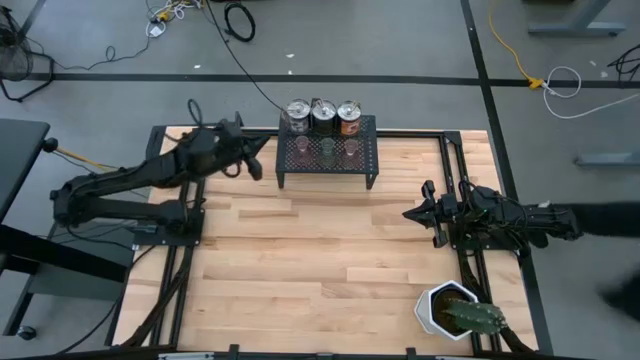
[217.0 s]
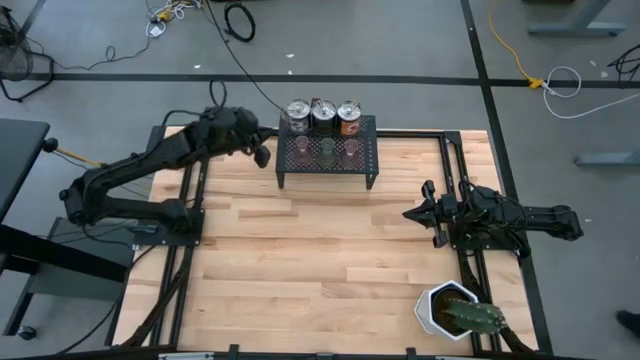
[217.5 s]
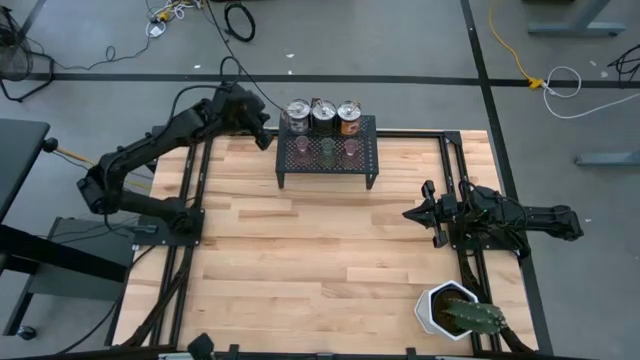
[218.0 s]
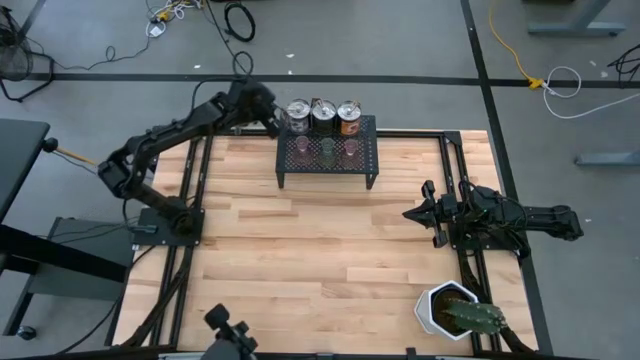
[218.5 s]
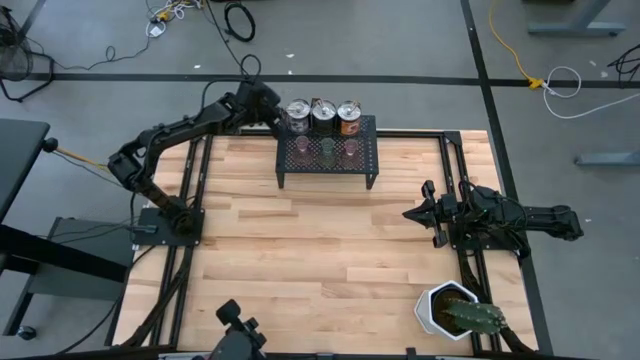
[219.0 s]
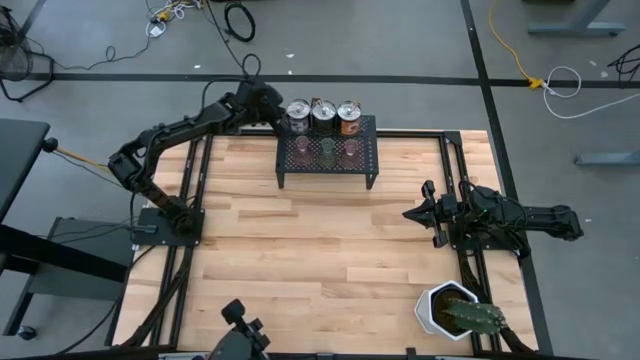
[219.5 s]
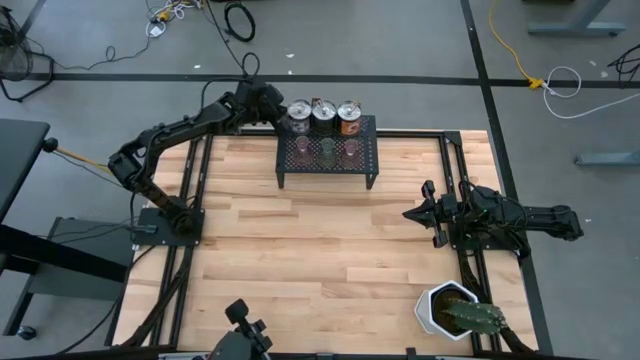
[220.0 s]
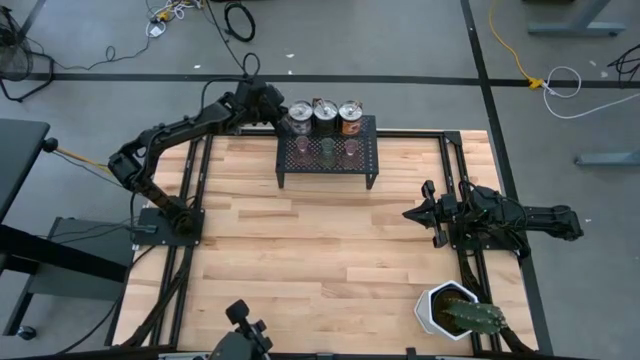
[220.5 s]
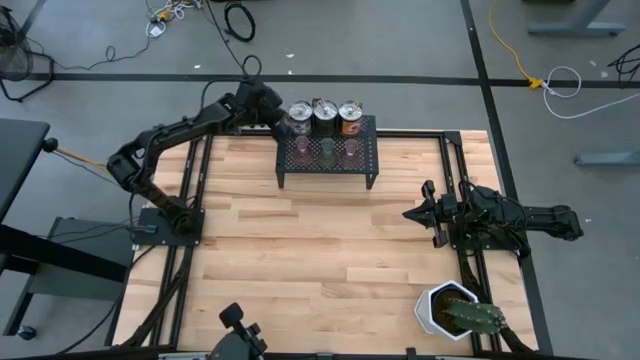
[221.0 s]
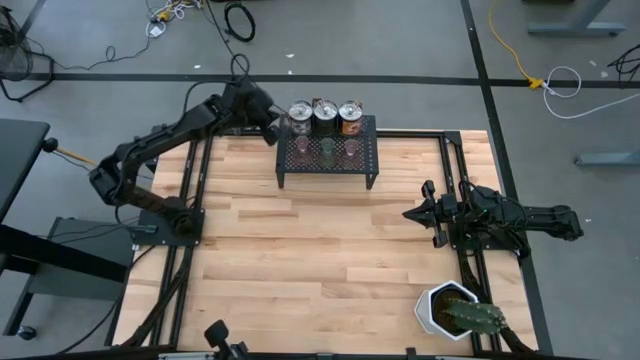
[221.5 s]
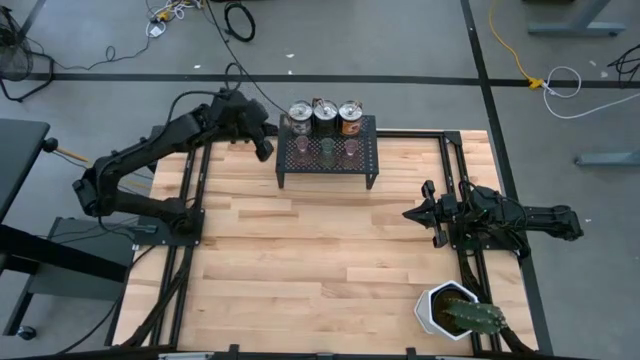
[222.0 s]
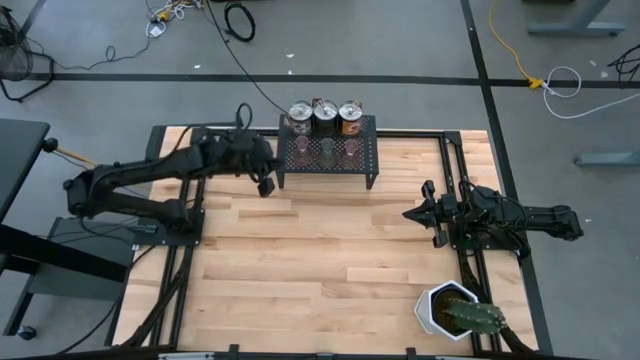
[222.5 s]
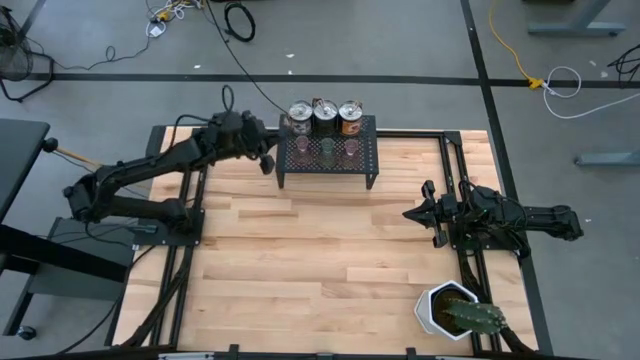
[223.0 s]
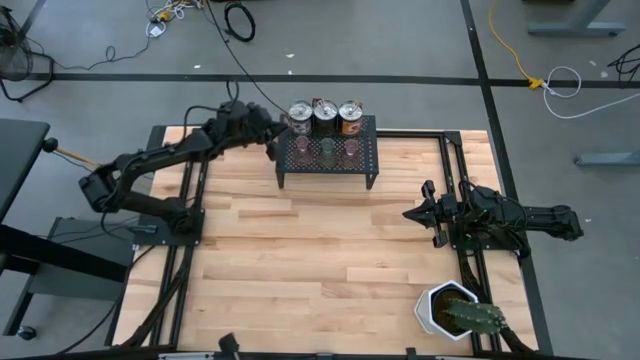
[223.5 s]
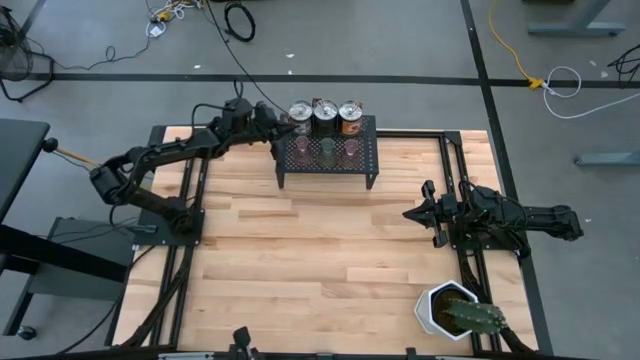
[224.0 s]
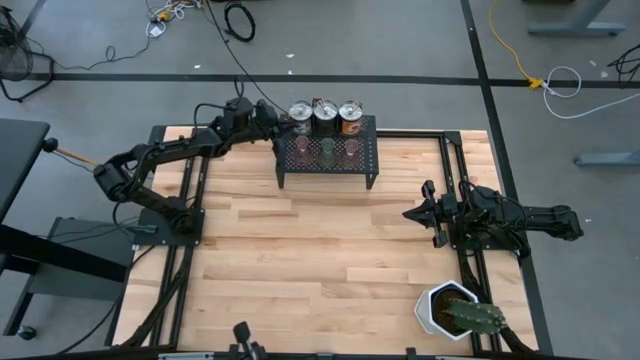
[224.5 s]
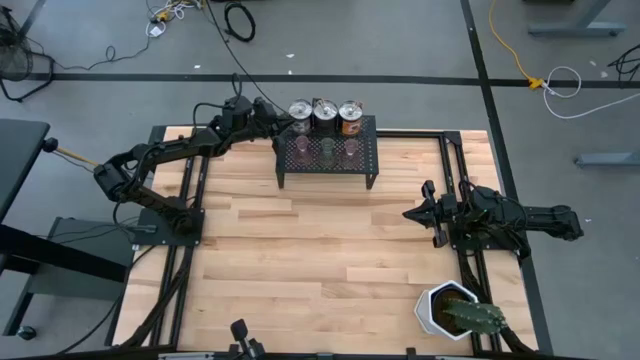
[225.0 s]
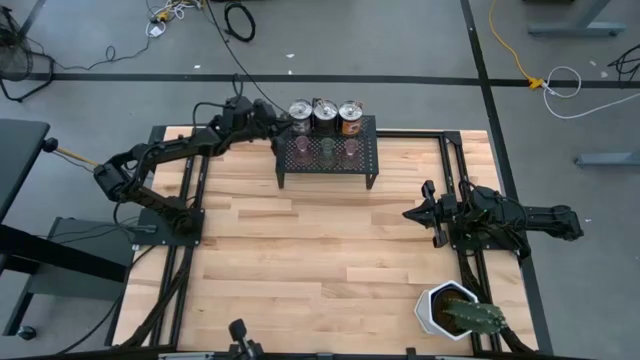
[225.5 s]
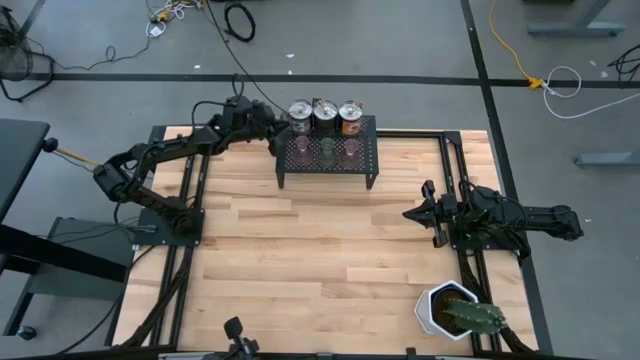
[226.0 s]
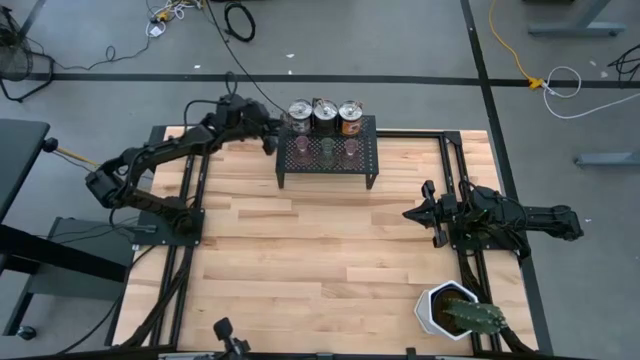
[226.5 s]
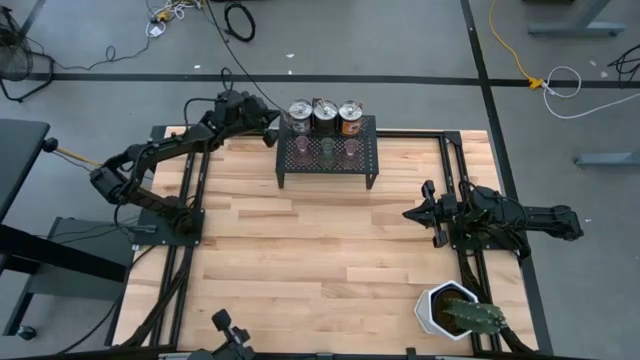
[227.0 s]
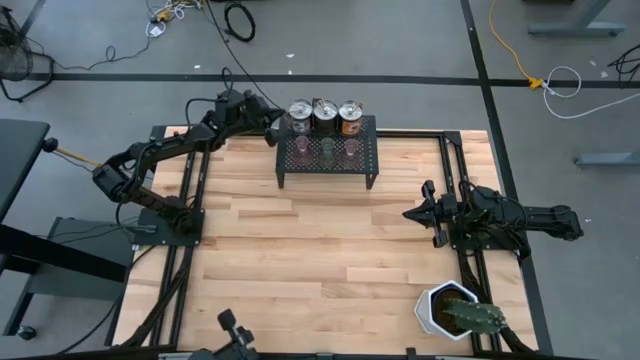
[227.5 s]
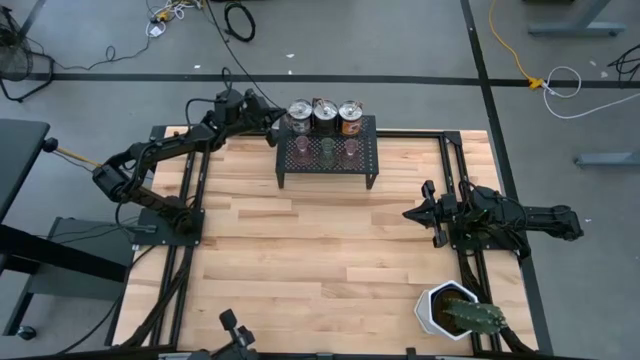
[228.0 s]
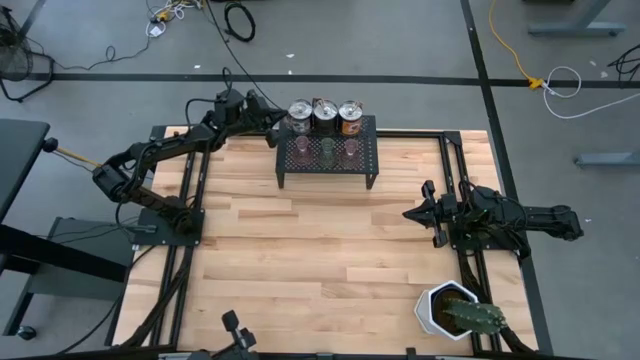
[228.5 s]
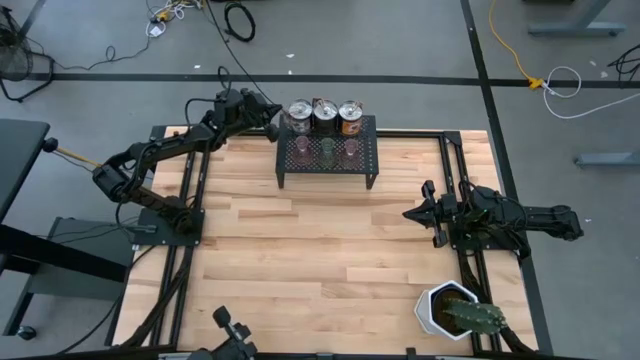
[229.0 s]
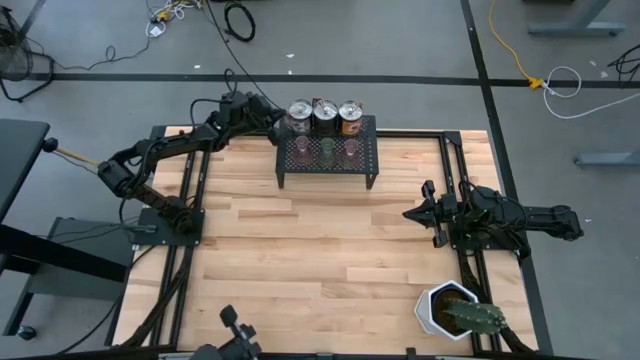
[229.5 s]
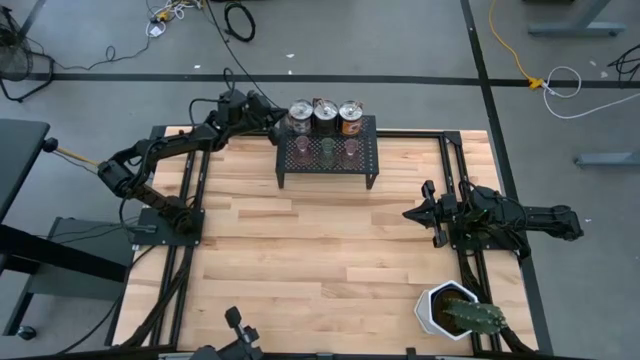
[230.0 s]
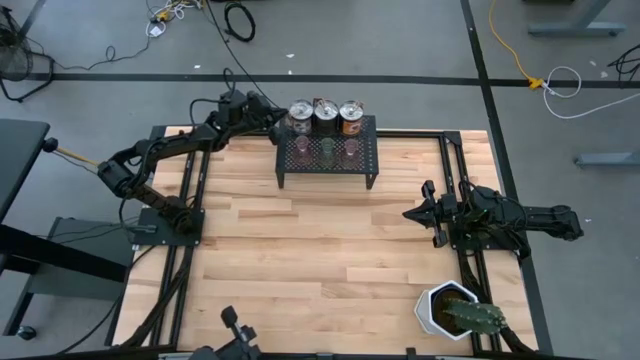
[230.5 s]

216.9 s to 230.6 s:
Task: Pick & Place candle stick holders
Adjust the silver scented candles

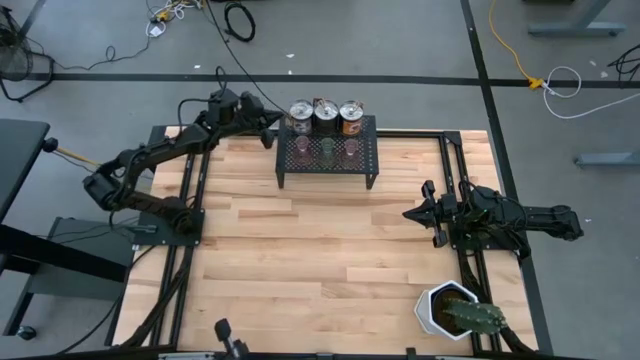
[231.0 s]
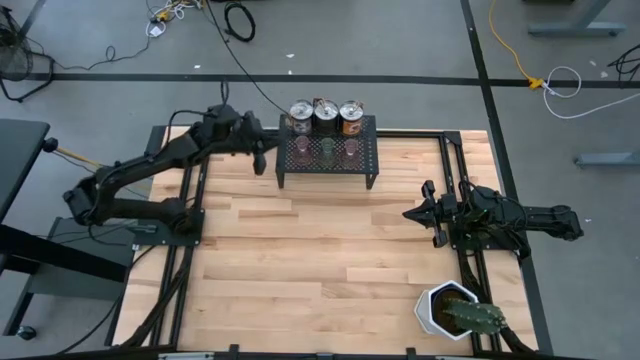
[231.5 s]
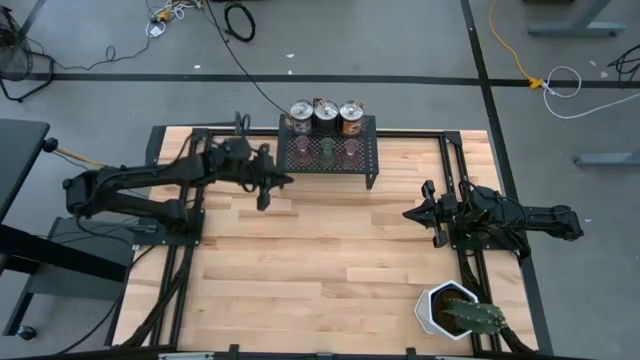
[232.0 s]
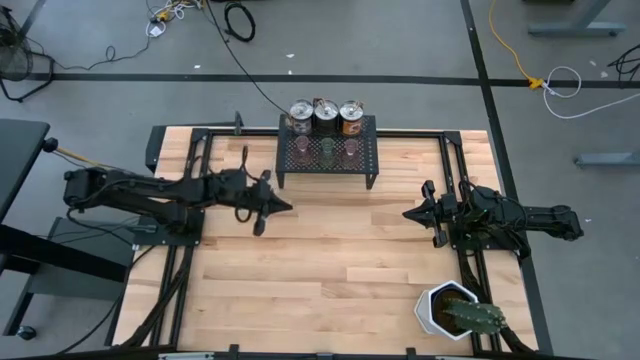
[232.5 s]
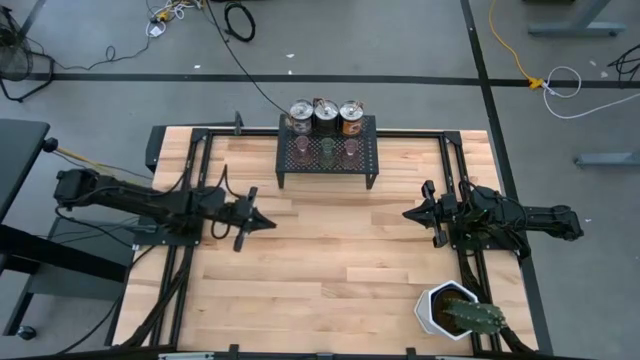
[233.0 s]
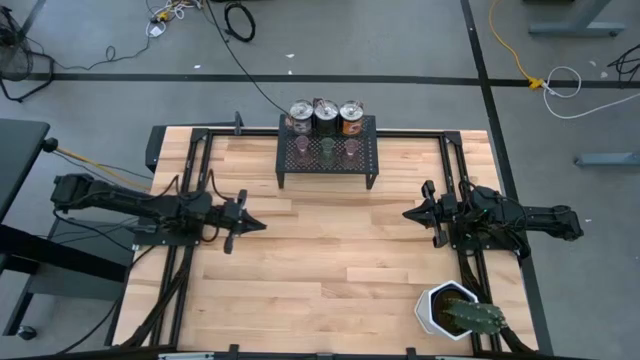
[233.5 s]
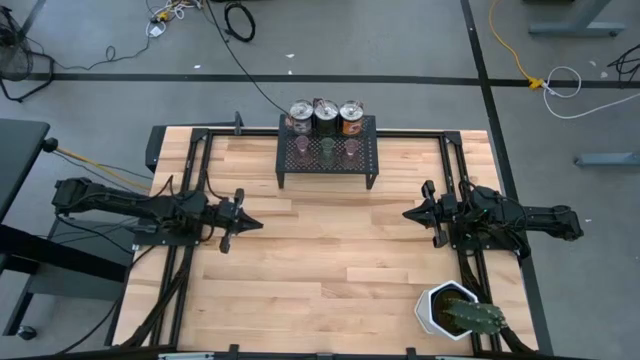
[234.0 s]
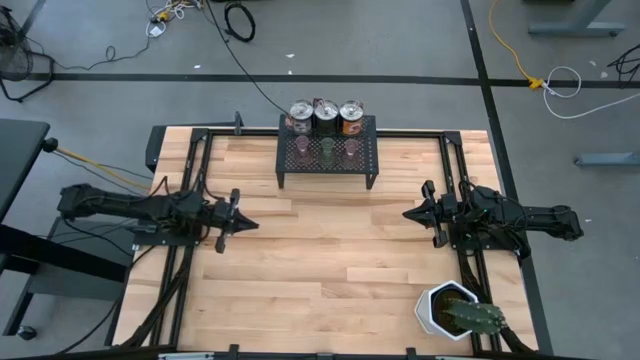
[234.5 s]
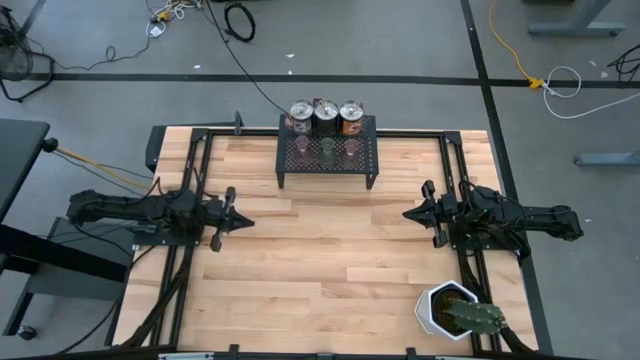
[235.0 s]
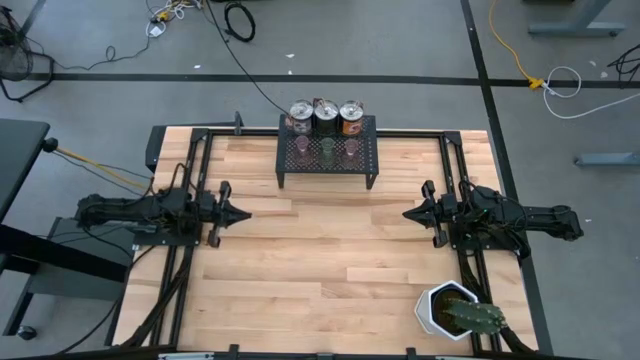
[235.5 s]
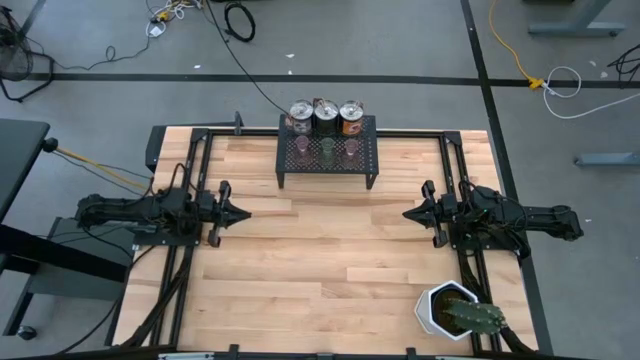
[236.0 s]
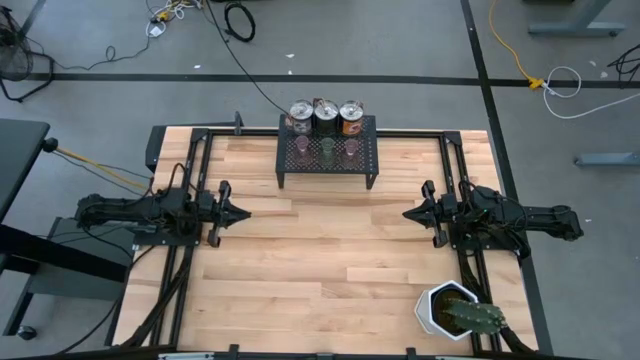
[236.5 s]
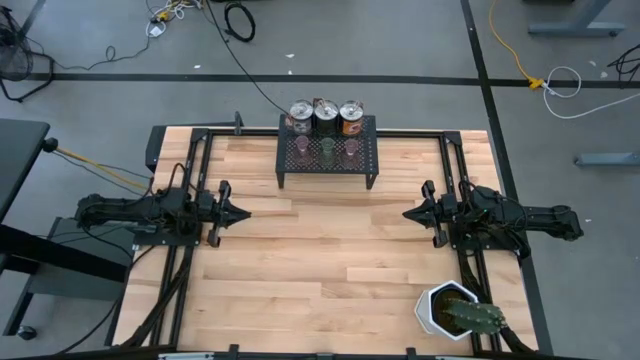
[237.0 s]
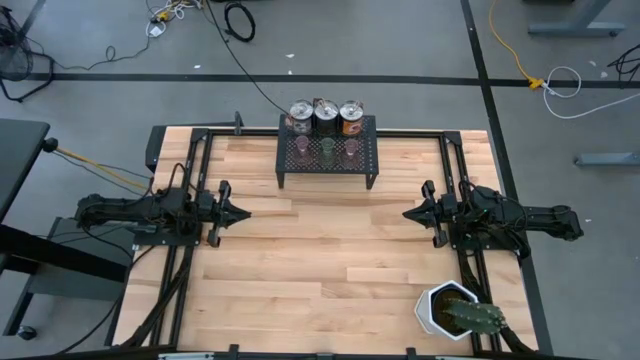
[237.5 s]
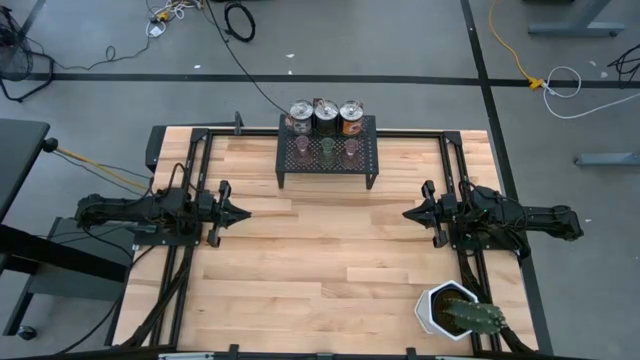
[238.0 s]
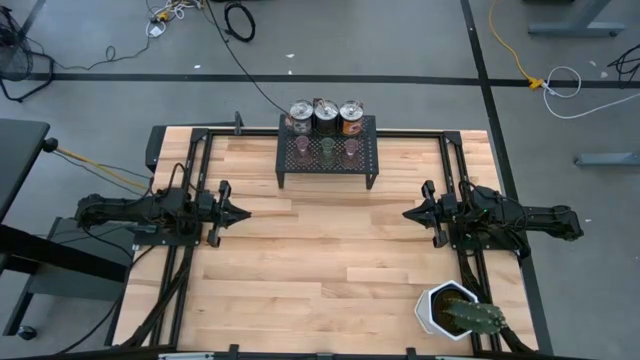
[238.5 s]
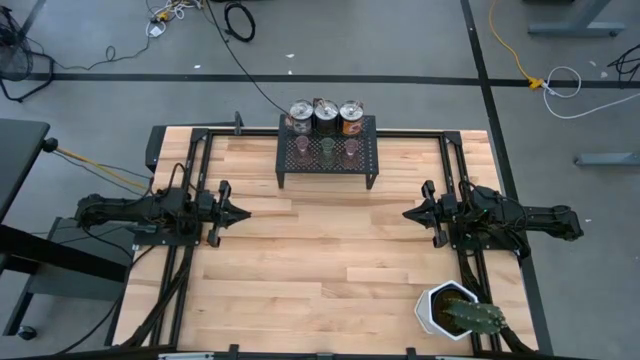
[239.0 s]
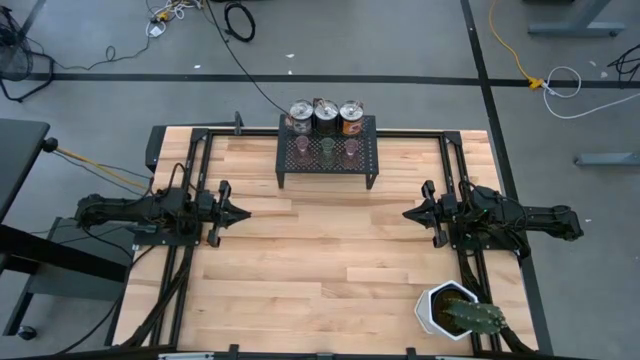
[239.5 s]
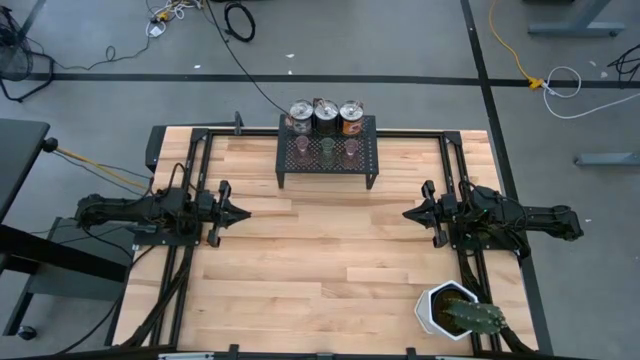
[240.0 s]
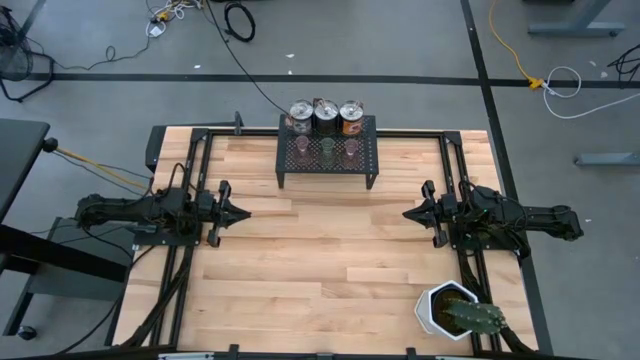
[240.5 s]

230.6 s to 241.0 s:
Return to Home Position
